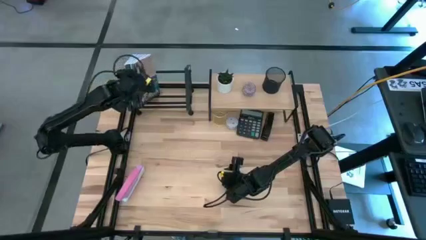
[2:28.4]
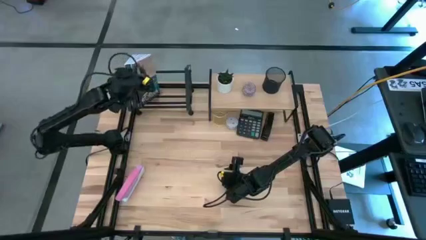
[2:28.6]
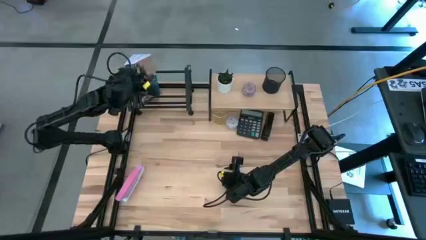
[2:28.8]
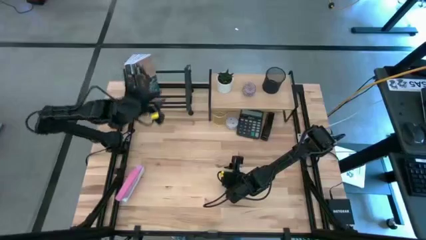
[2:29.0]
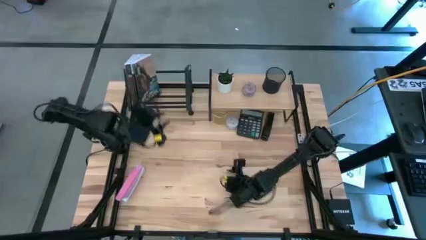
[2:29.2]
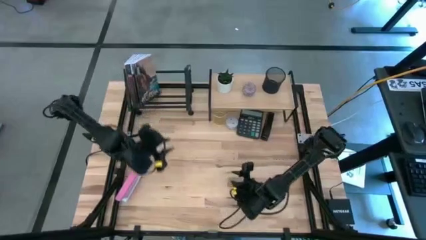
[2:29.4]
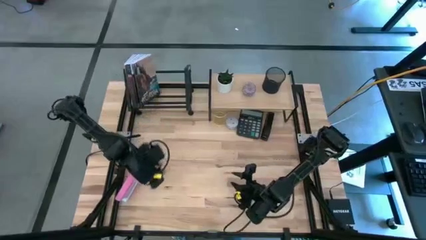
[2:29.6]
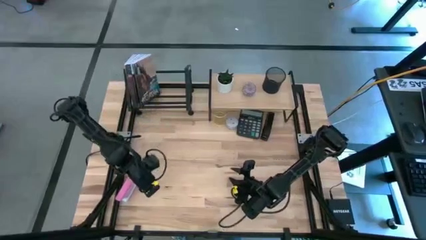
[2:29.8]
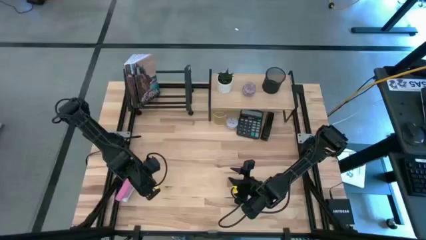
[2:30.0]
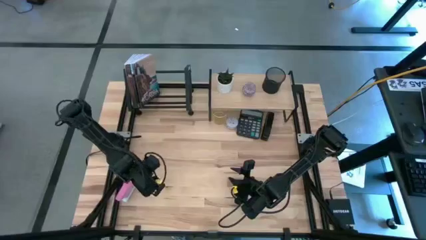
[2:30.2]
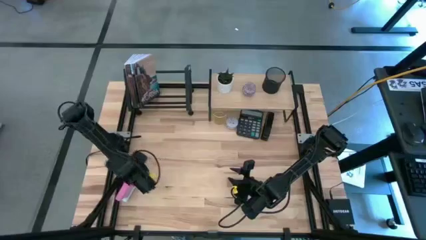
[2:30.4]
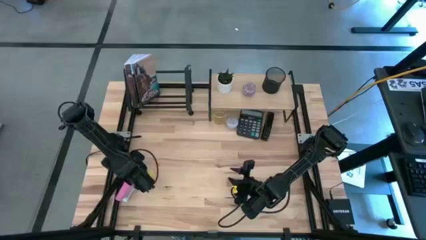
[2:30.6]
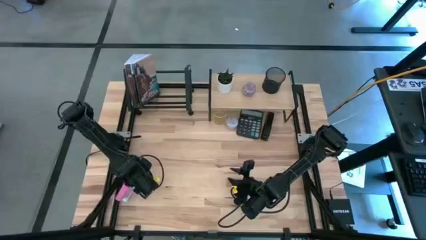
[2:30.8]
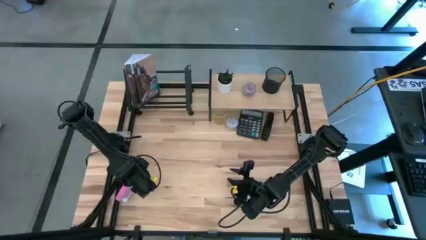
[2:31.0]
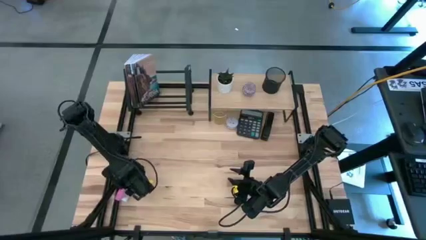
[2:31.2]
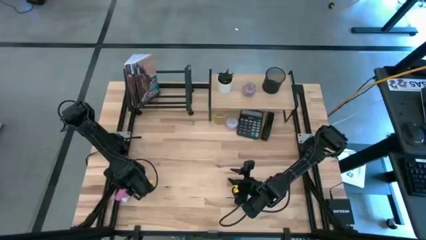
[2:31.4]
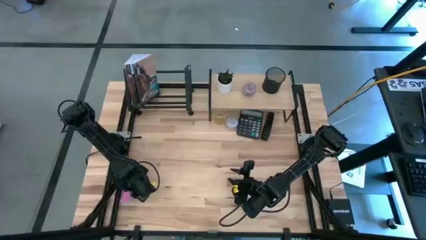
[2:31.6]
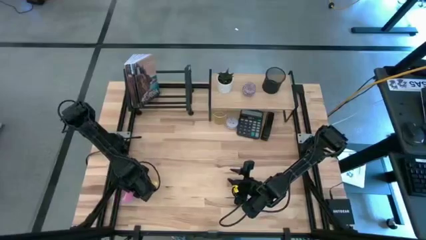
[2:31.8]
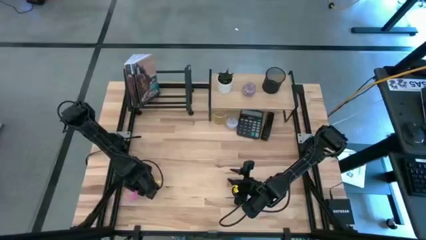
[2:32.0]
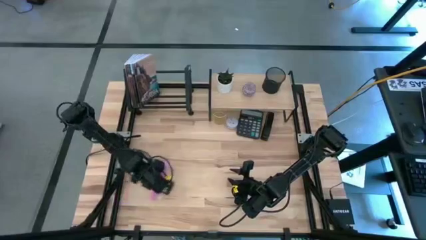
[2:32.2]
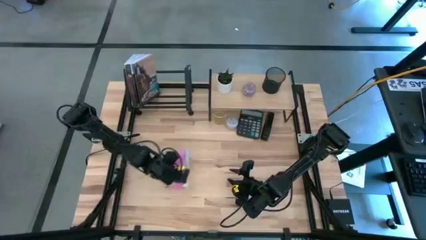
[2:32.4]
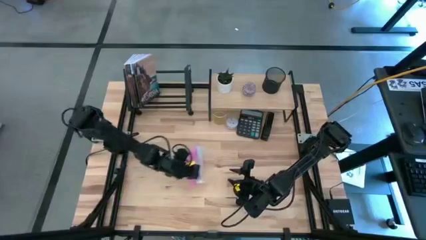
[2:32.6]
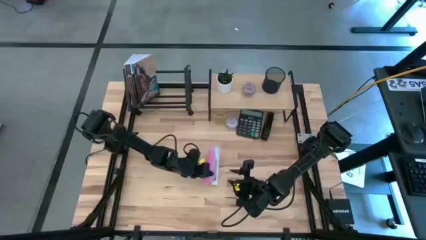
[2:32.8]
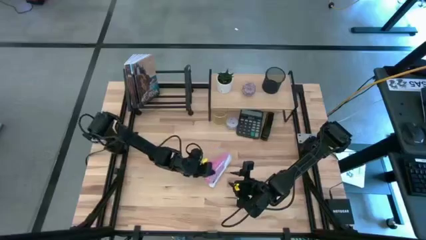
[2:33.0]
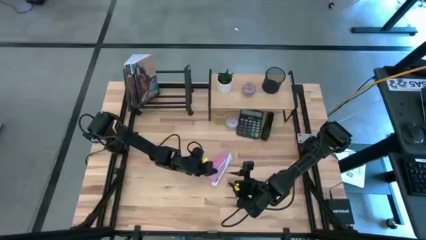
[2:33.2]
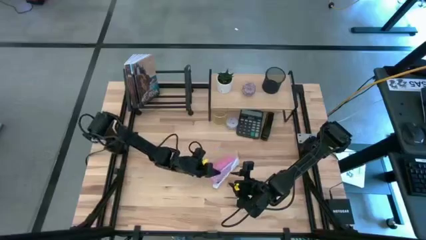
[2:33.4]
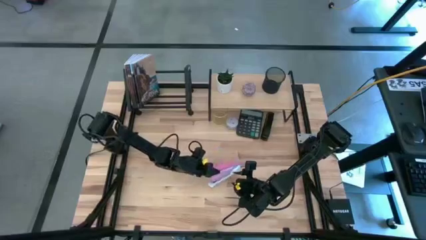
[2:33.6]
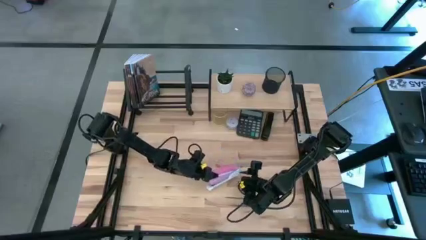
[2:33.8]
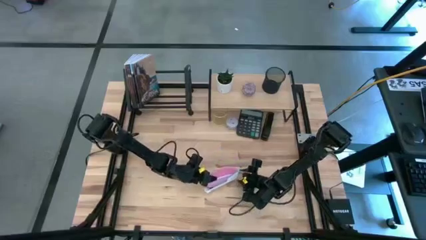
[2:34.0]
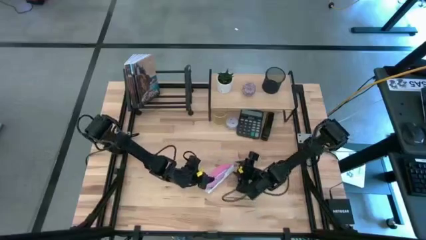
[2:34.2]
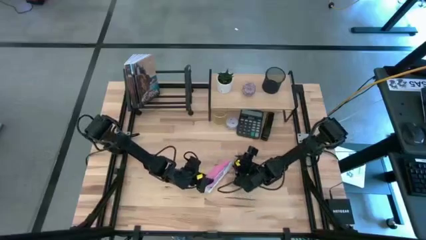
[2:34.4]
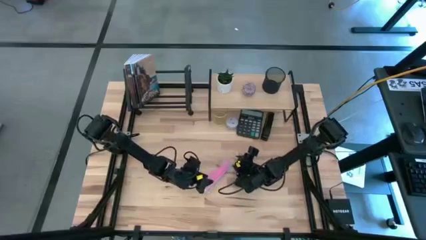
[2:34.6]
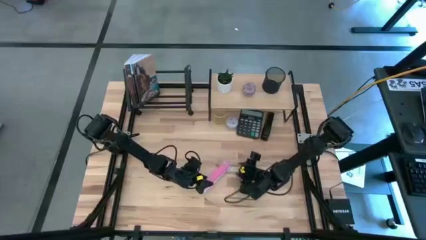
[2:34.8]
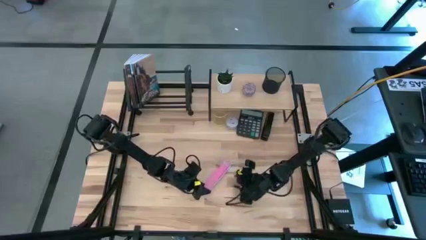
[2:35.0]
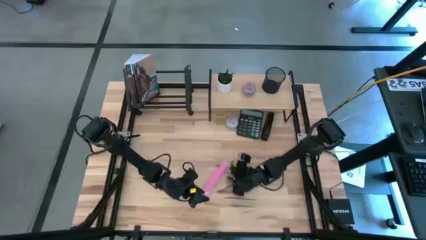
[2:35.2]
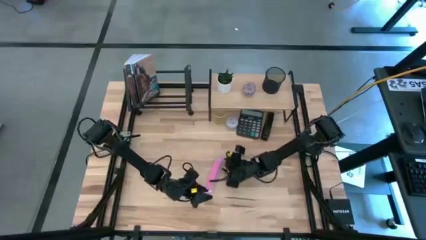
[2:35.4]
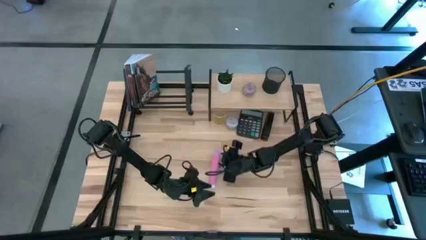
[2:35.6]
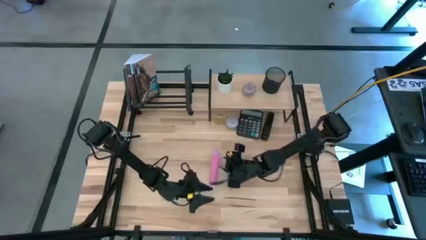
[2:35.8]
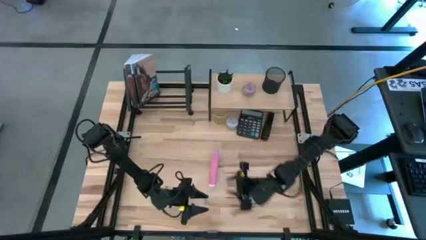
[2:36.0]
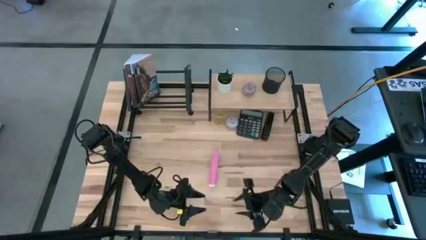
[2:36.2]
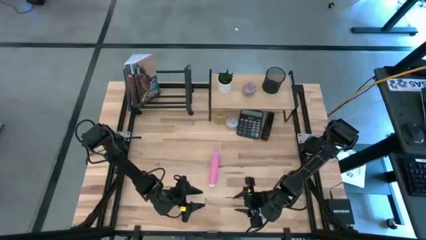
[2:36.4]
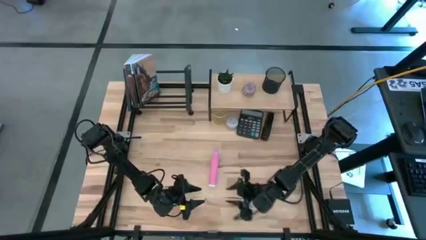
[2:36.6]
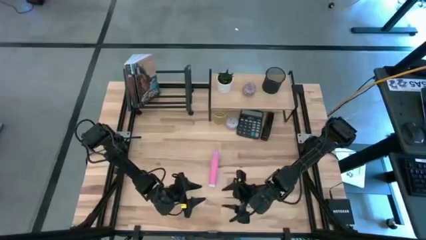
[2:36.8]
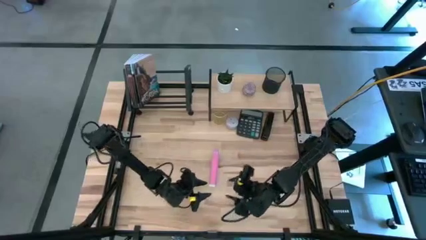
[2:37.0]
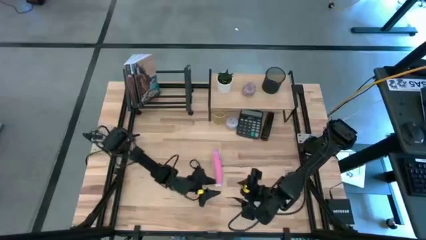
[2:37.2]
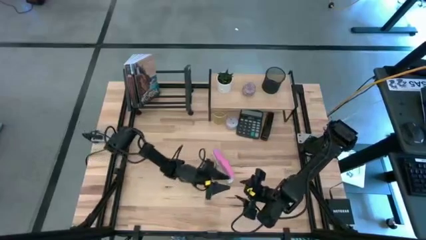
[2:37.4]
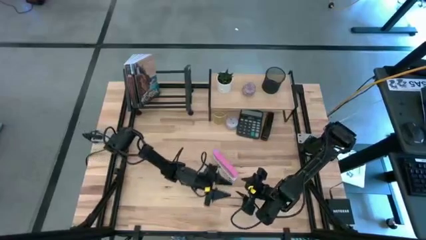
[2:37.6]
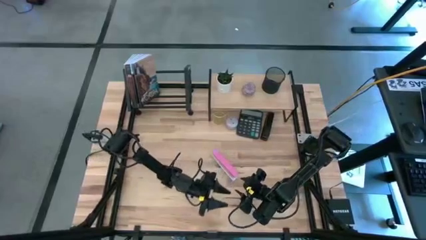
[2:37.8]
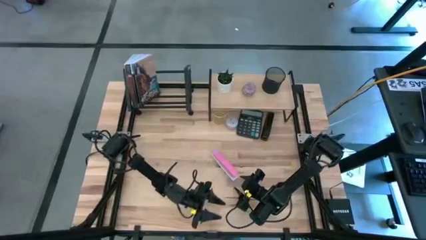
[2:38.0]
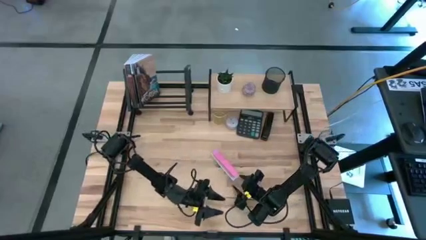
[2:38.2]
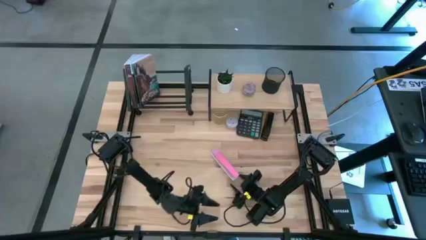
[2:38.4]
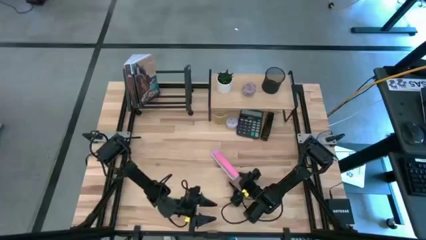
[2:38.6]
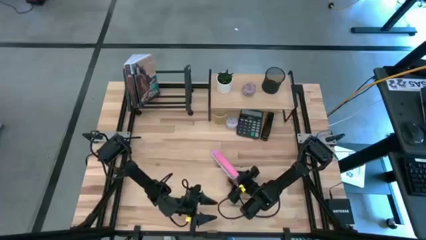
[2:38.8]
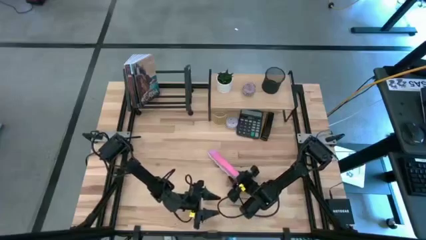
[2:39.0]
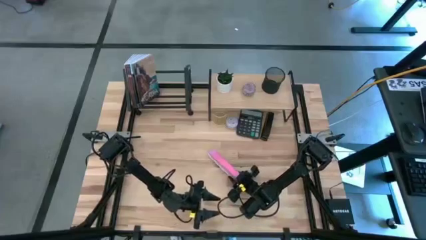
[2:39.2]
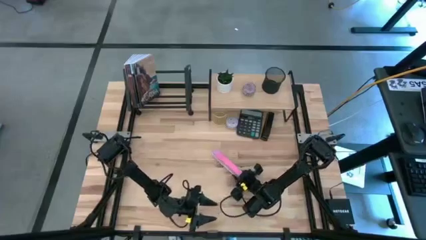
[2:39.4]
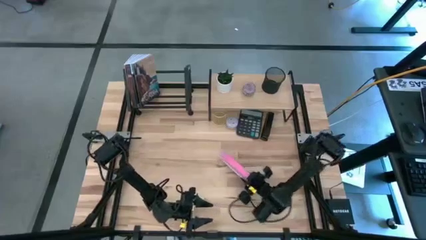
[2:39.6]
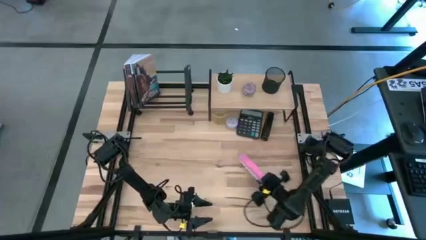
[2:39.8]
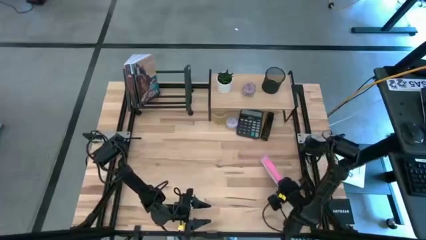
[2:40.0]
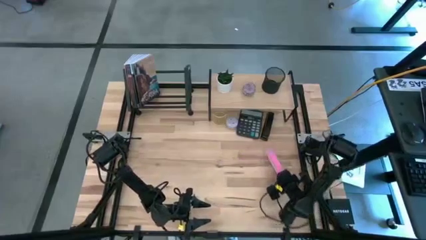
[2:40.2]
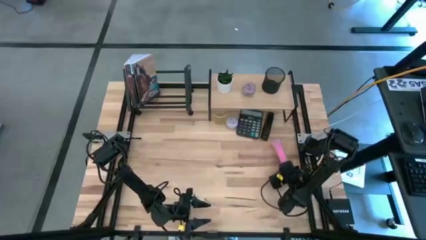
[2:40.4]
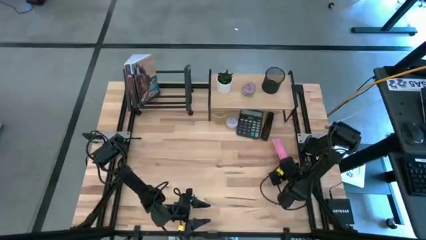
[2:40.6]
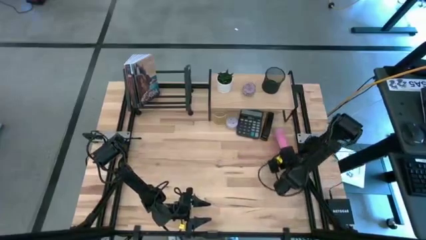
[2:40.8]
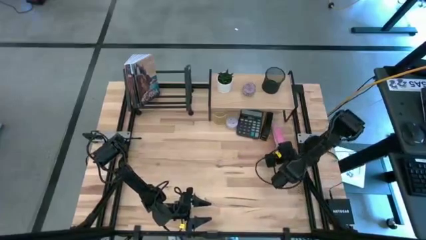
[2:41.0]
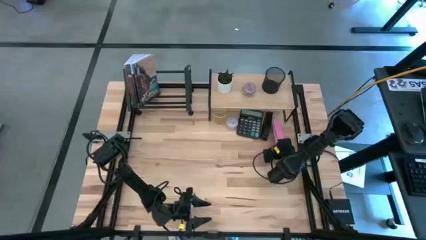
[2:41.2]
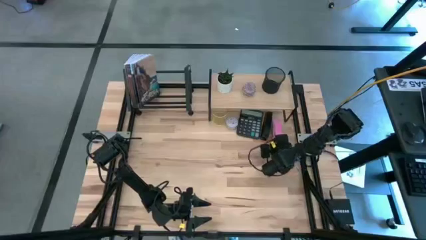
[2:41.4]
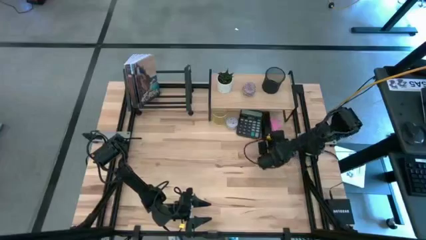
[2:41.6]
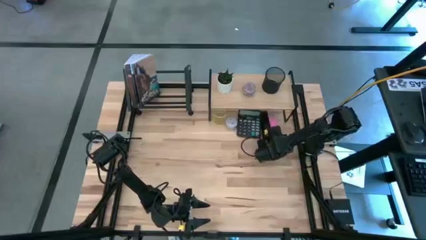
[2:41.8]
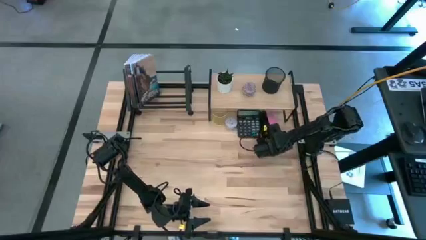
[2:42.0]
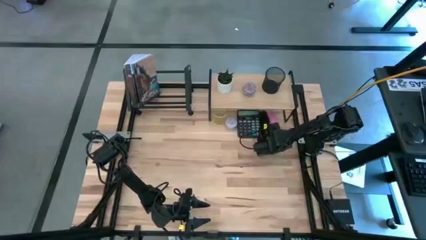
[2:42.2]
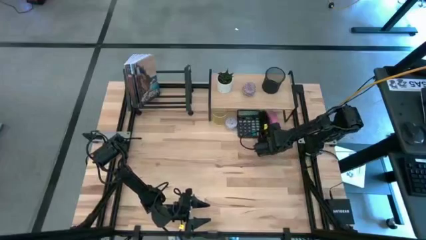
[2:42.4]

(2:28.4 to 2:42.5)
Task: Stock shelves
Put the pink stapler under the shelf

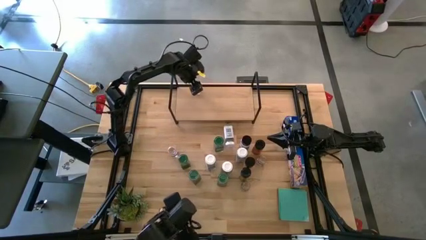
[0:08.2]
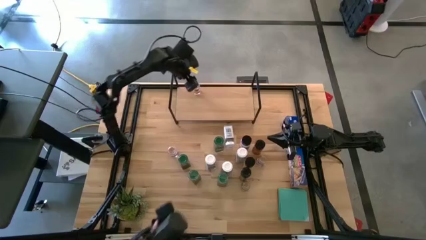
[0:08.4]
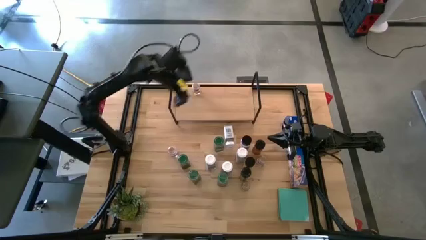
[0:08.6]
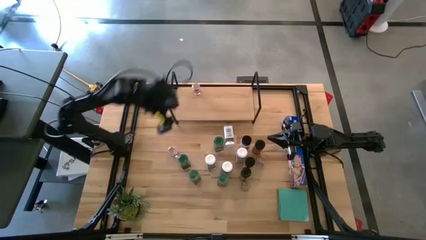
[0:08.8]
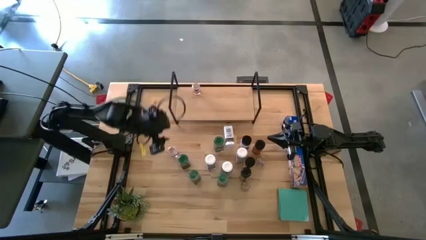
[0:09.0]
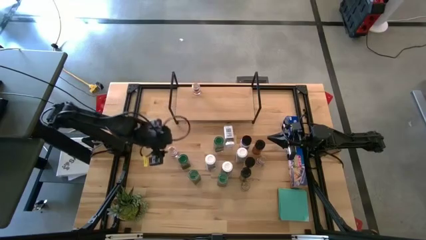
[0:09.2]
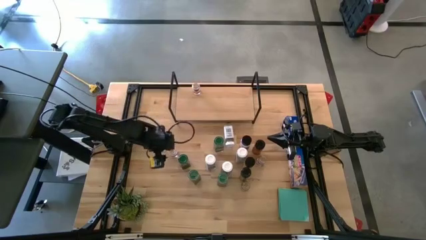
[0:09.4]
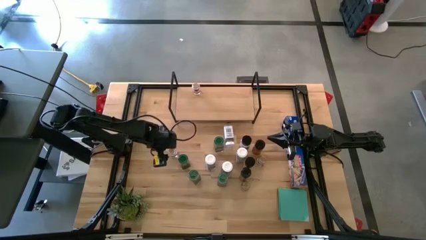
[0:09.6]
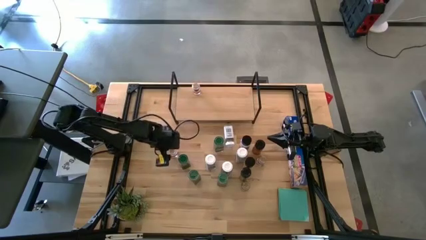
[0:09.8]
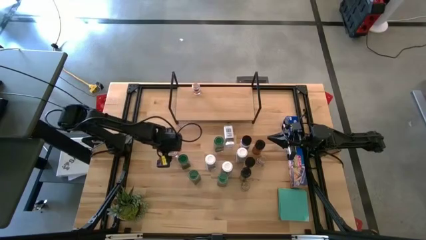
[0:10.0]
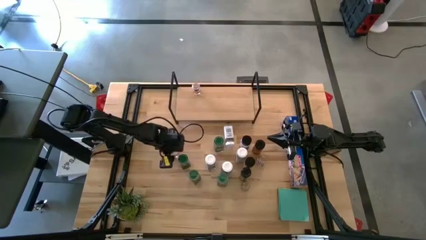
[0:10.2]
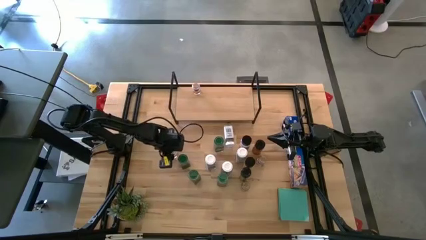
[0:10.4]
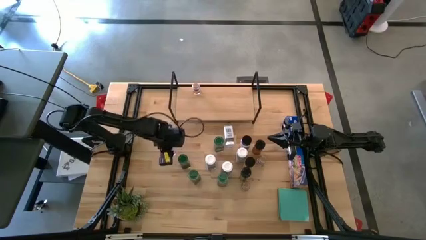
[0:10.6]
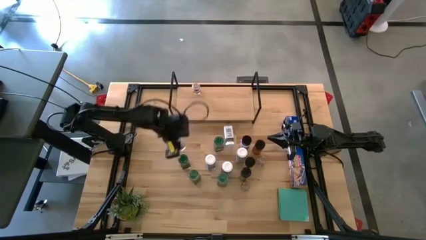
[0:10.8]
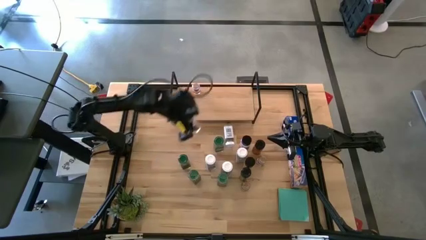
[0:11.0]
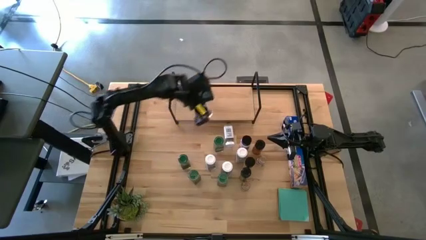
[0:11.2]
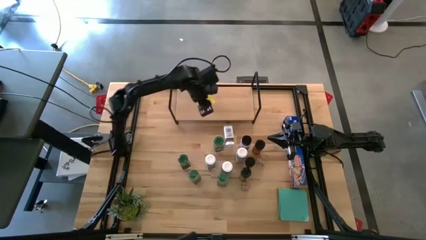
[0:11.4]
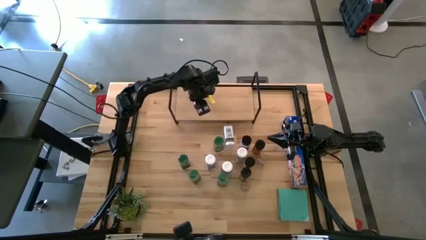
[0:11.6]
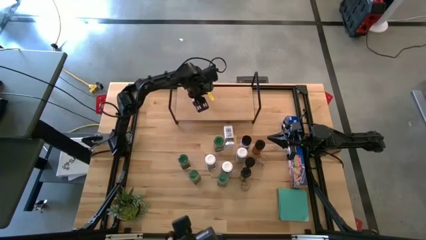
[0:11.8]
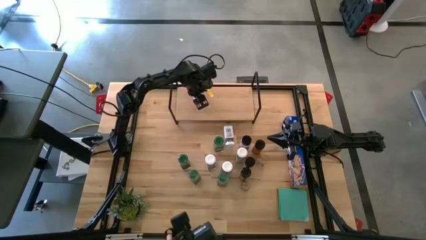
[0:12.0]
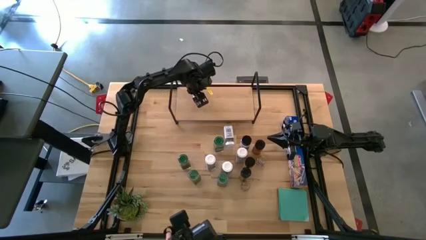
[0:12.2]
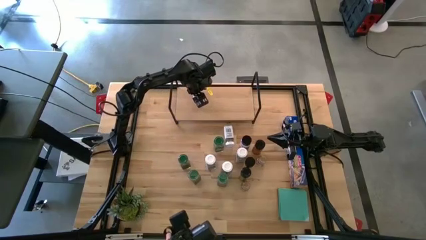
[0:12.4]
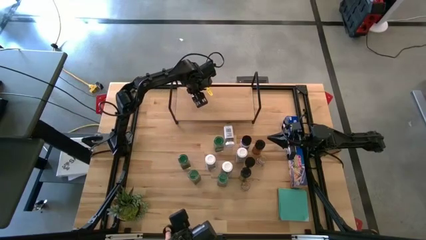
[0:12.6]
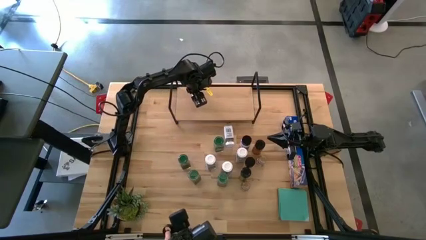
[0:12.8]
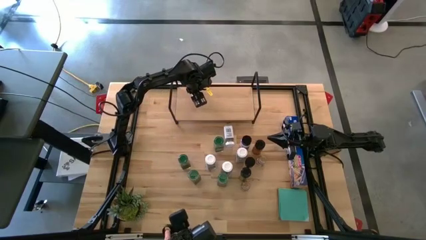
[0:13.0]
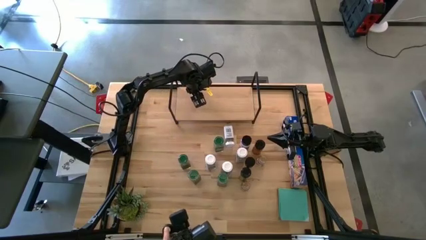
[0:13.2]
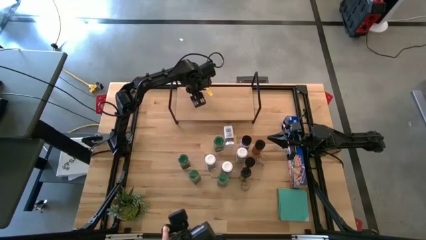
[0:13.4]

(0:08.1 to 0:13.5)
Task: Shelf spices
Put the left brown seasoning bottle on the shelf aligned with the other brown seasoning bottle
